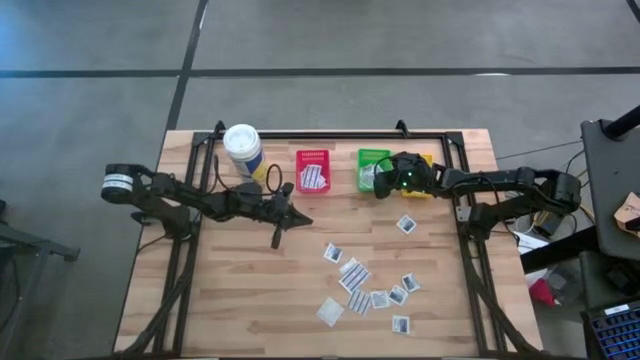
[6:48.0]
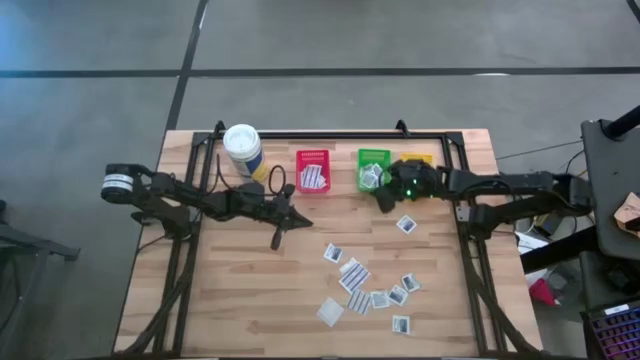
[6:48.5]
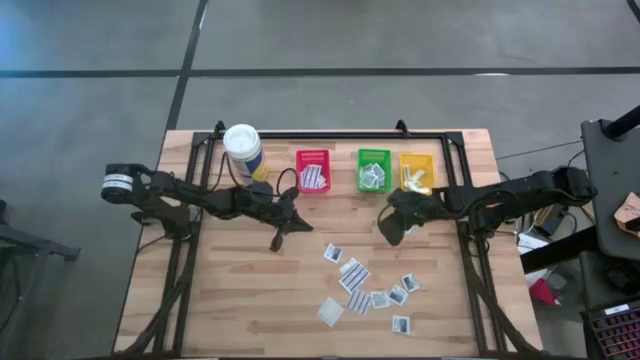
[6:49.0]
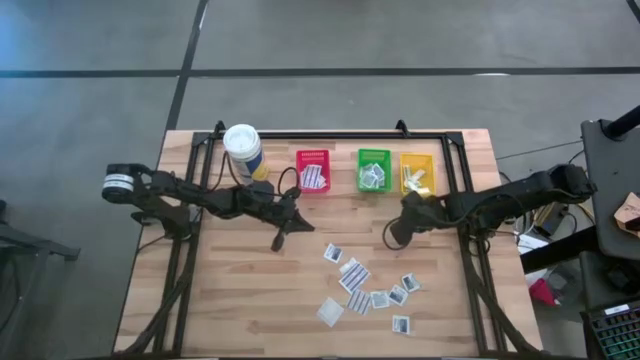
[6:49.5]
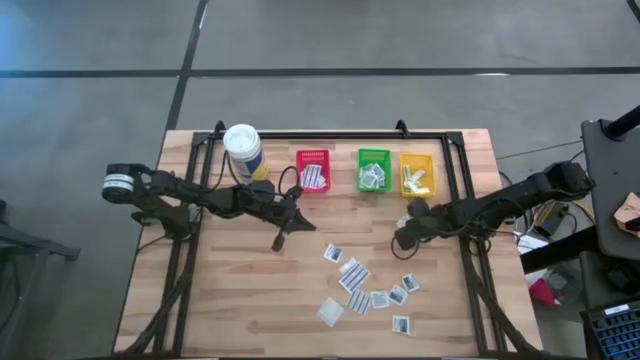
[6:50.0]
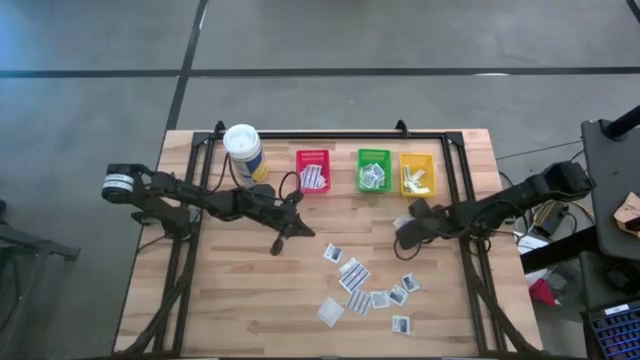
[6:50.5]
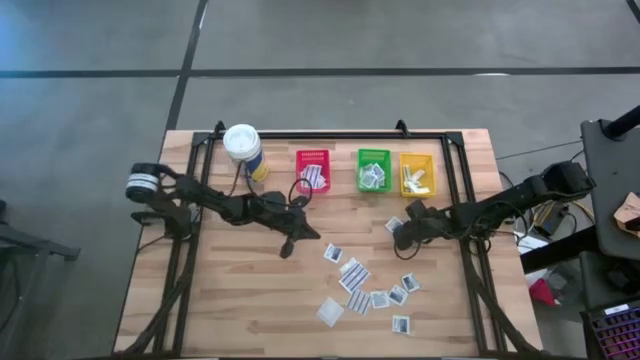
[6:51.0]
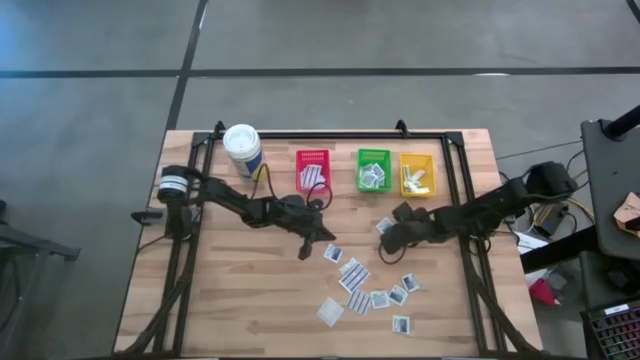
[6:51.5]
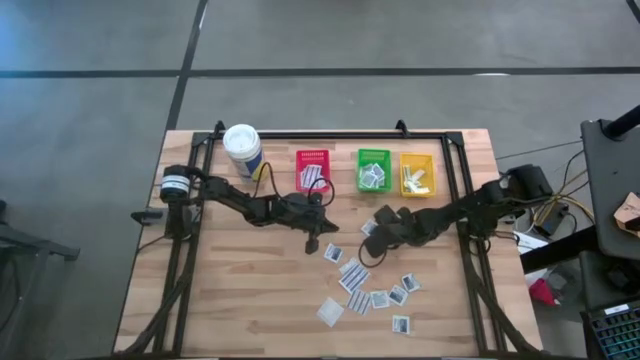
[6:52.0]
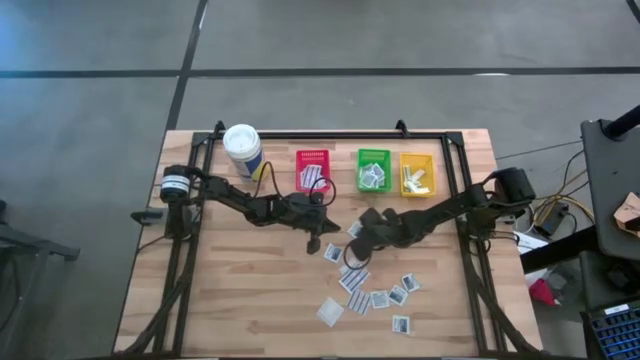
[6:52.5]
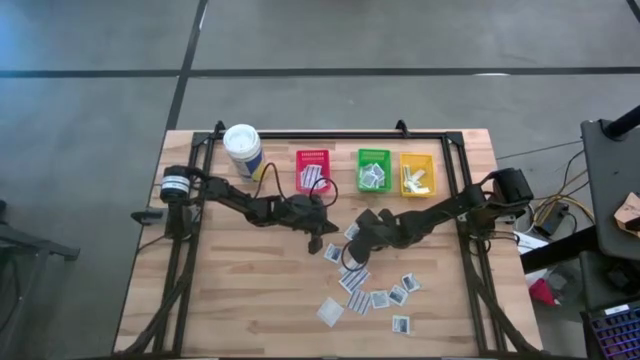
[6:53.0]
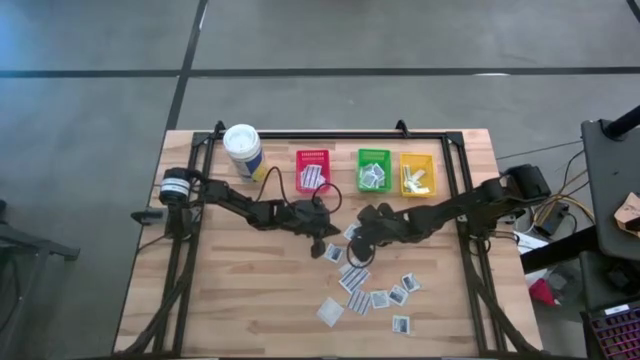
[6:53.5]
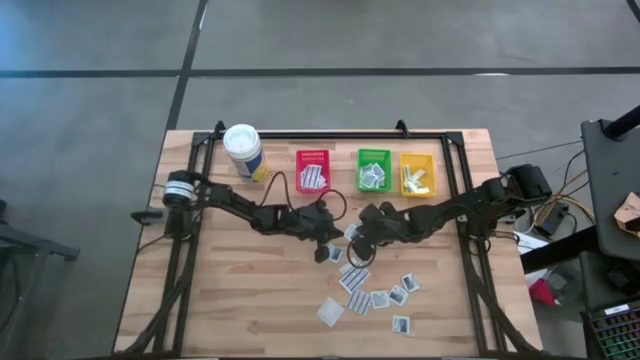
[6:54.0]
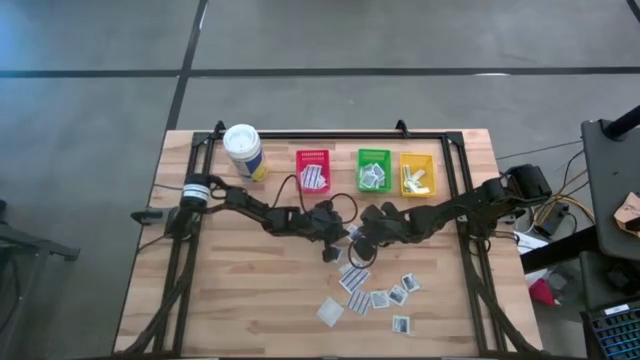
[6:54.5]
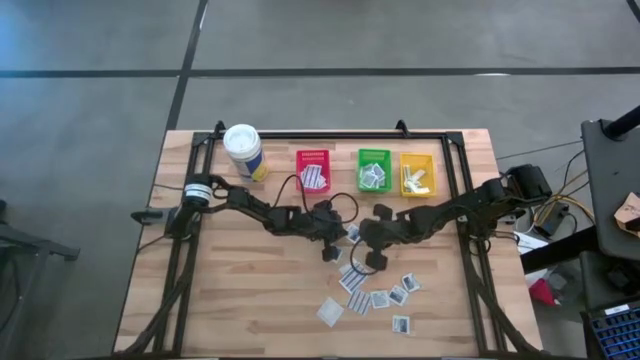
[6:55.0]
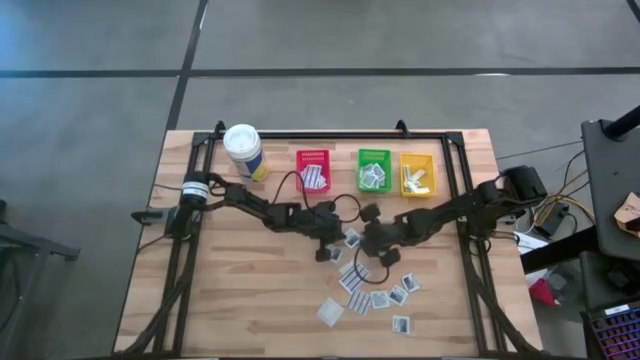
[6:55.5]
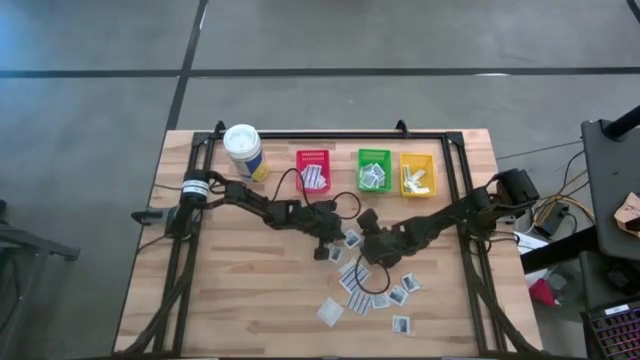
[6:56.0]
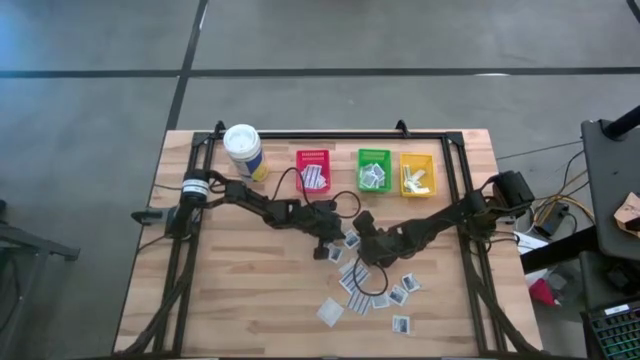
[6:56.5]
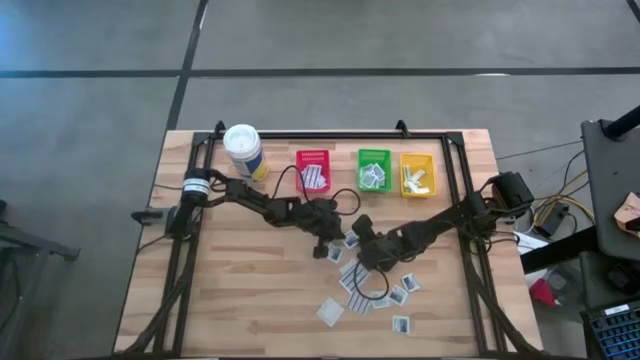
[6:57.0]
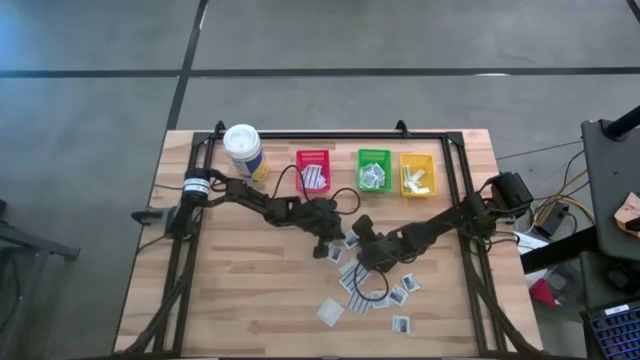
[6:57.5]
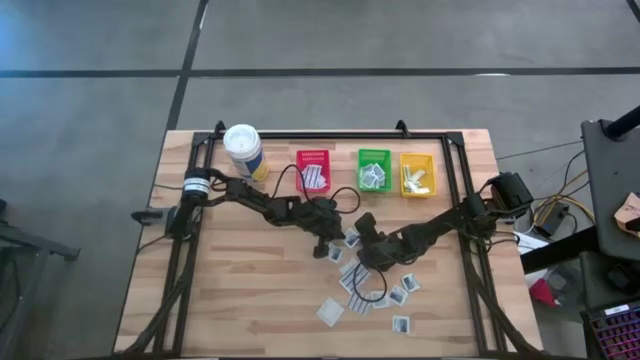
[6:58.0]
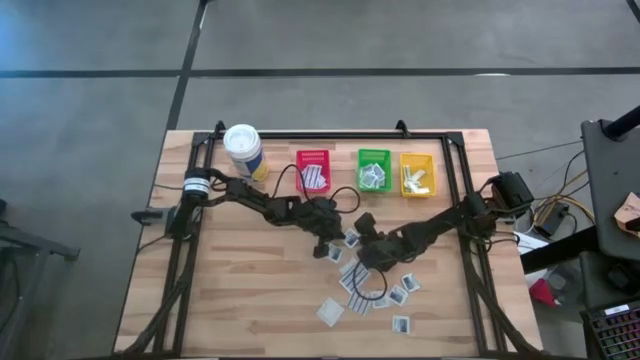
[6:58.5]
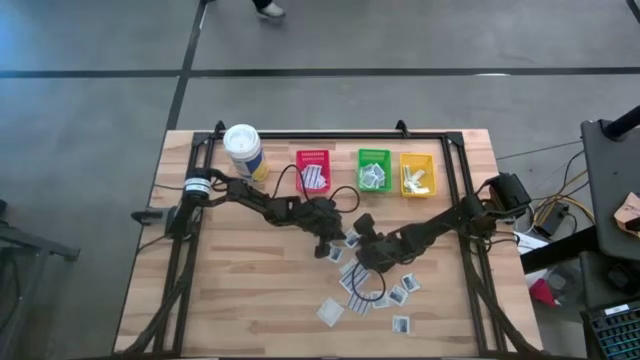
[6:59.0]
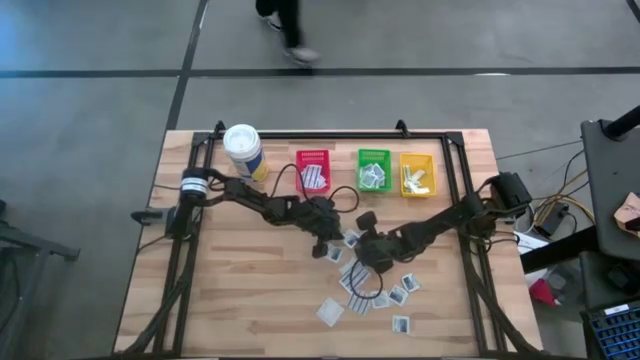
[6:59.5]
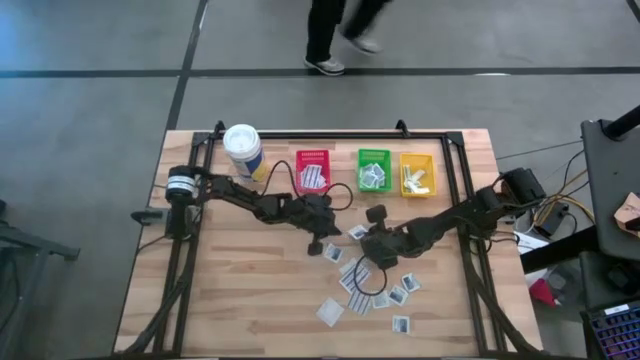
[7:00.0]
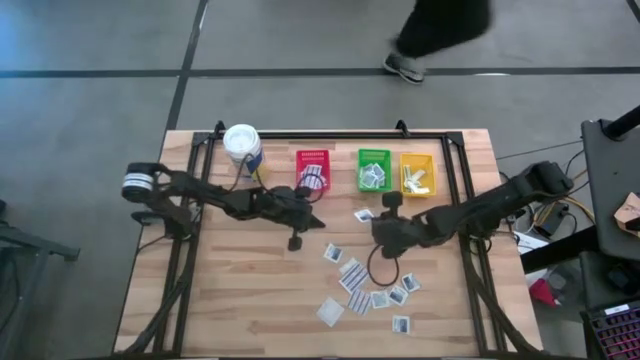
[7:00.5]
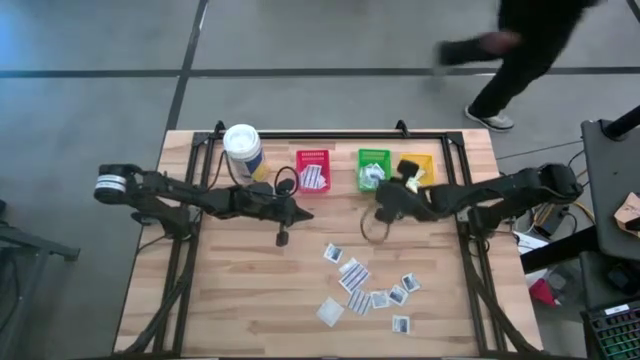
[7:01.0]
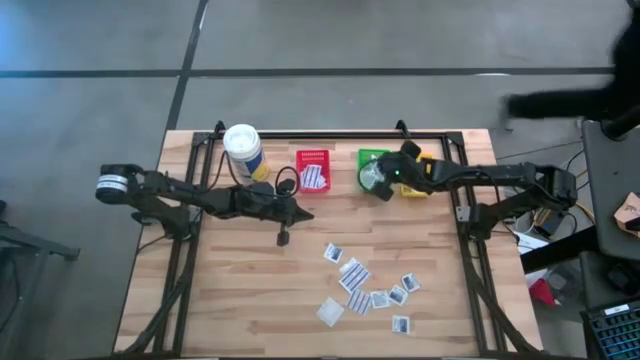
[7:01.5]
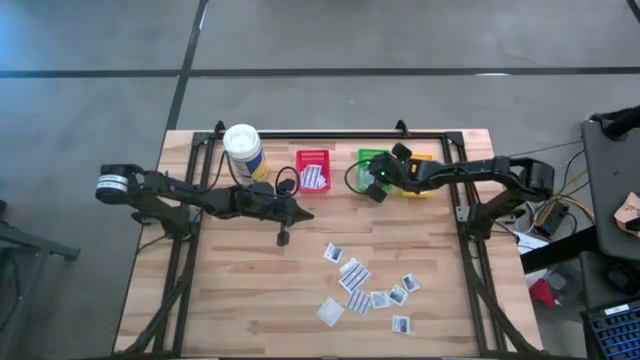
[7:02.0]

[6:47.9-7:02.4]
Task: Pick & Place First Aid Supplies
Put the alcohol pad in the green bin

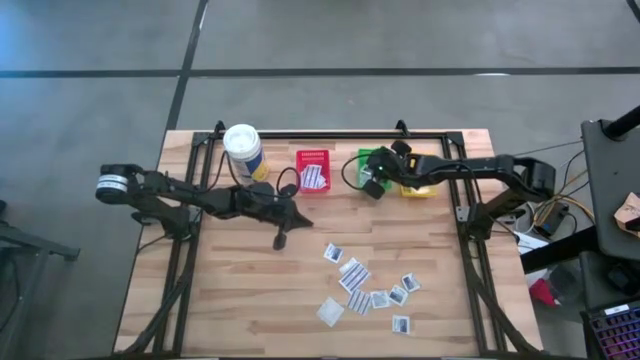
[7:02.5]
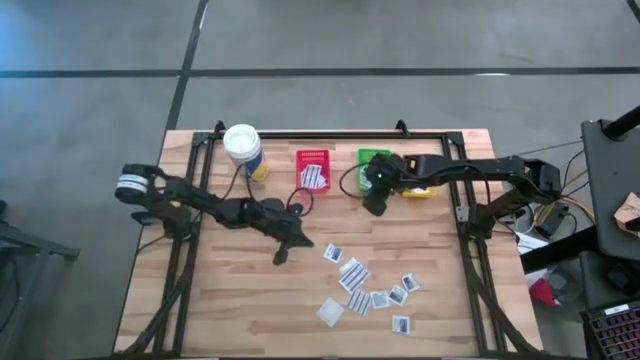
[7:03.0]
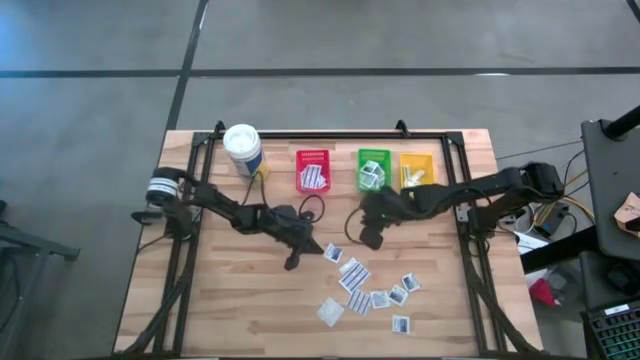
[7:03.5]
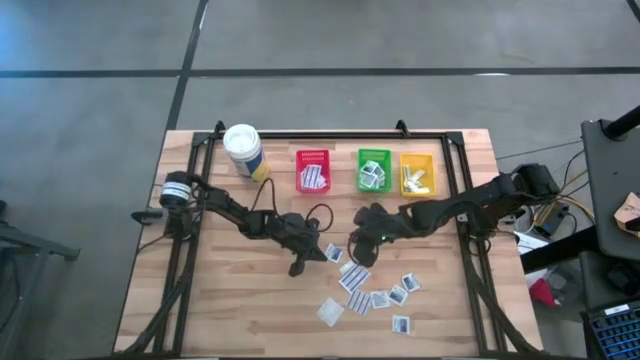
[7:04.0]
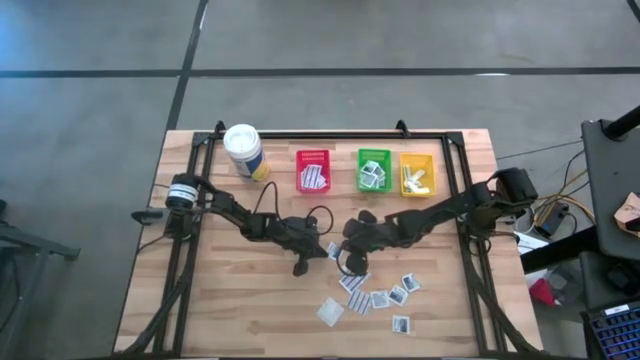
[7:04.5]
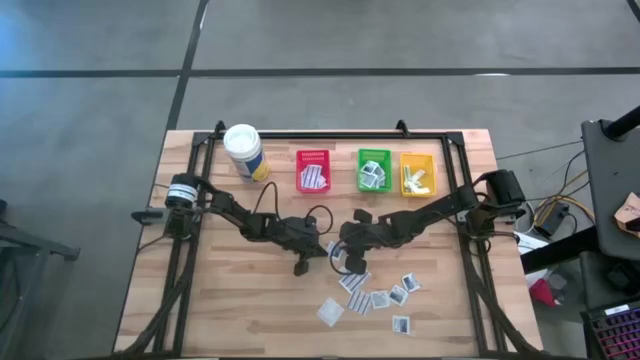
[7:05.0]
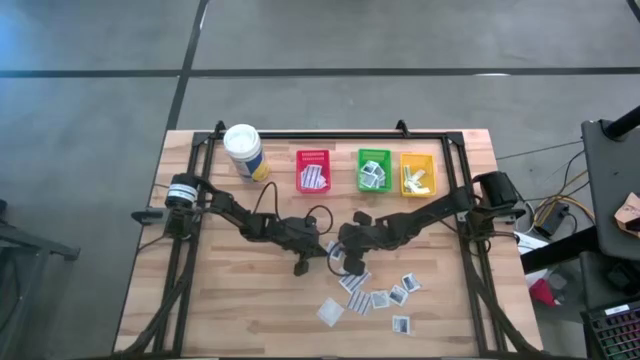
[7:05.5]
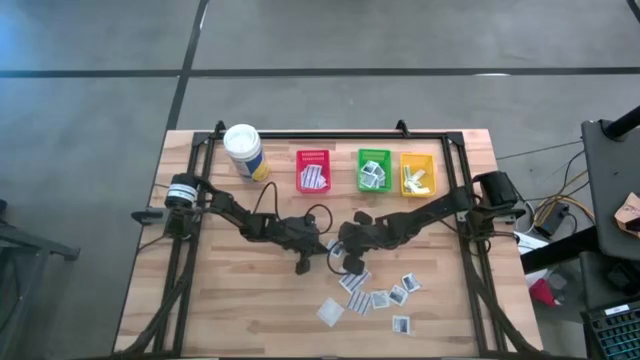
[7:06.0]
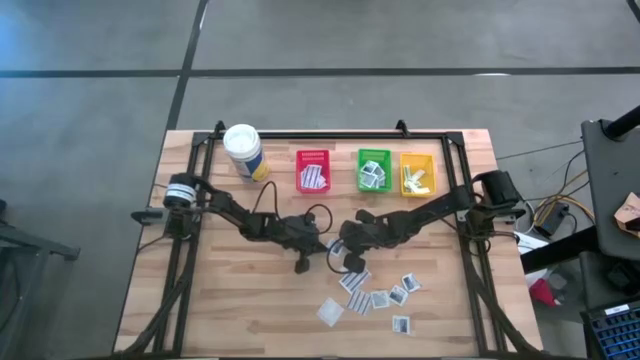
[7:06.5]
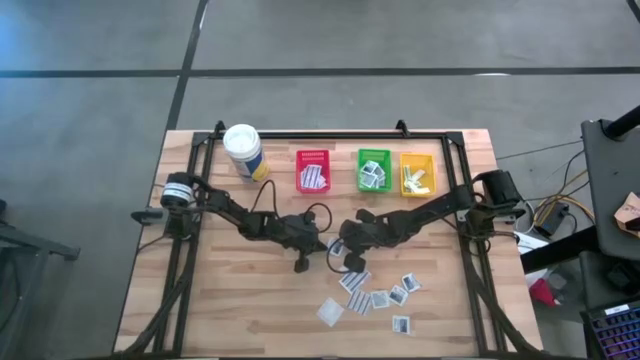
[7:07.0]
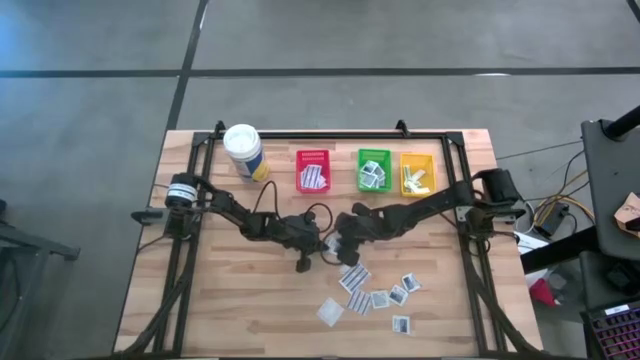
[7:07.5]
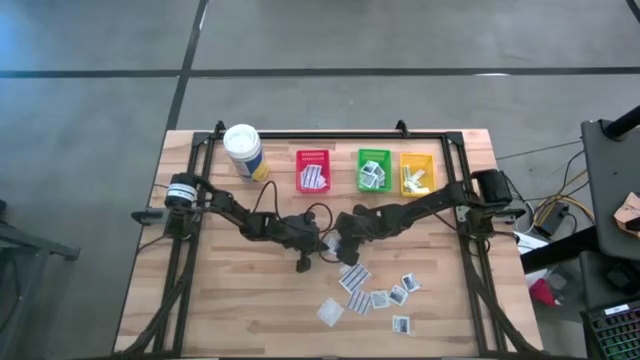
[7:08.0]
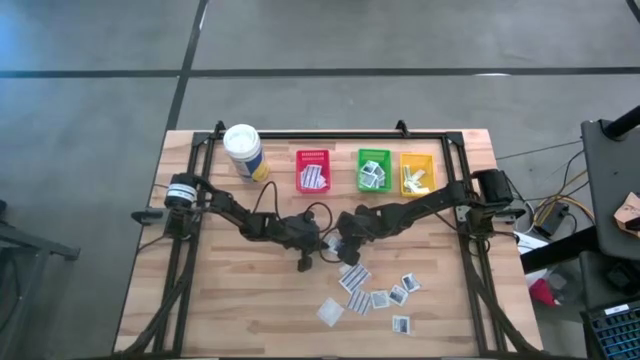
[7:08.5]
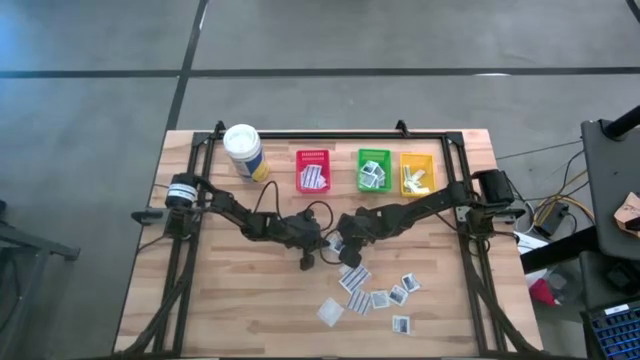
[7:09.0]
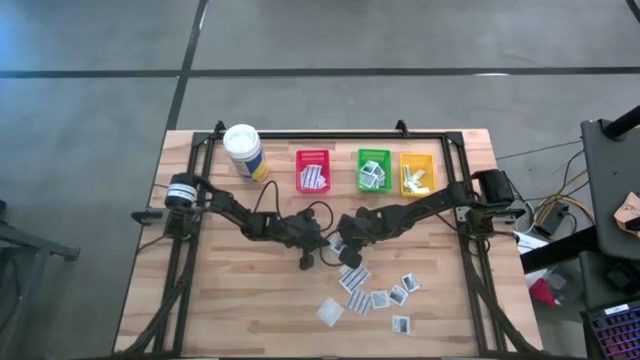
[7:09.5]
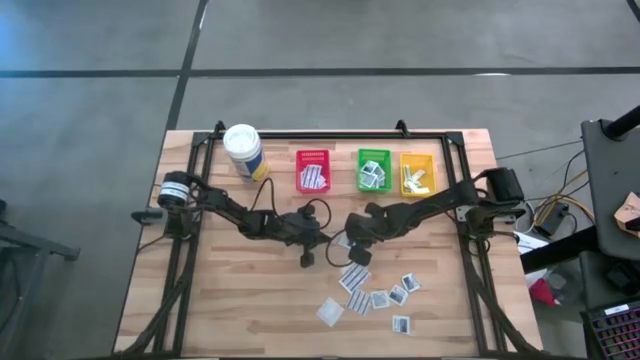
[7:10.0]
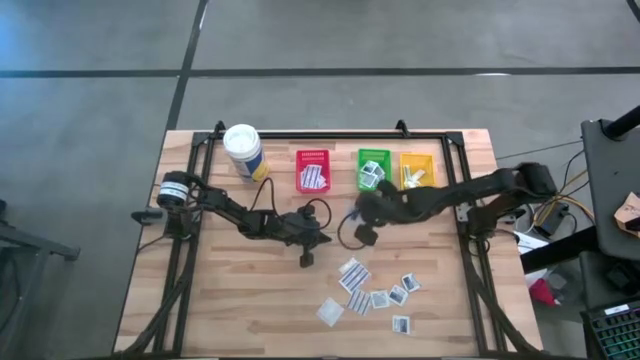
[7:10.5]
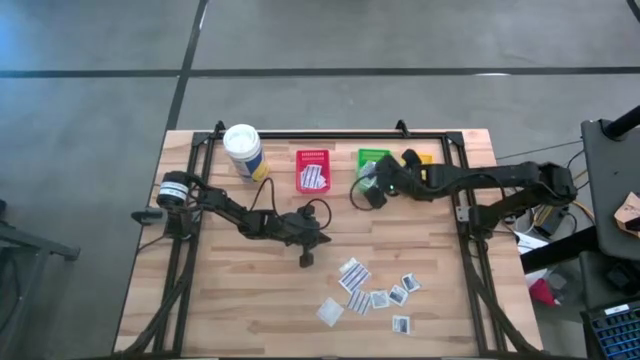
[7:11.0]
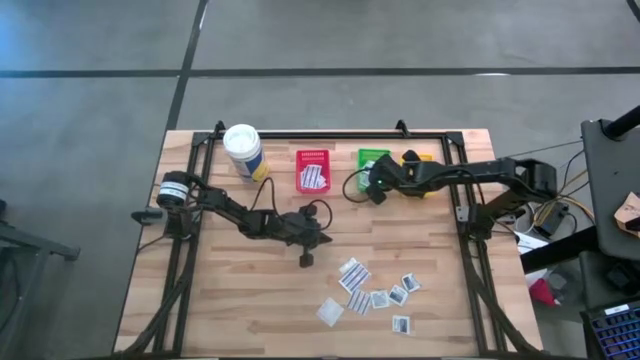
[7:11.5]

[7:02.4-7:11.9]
Put the alcohol pad in the green bin
